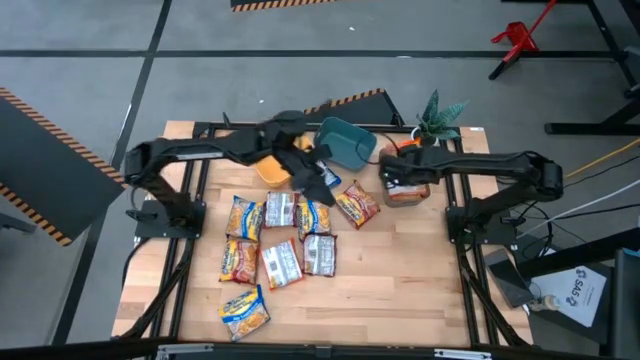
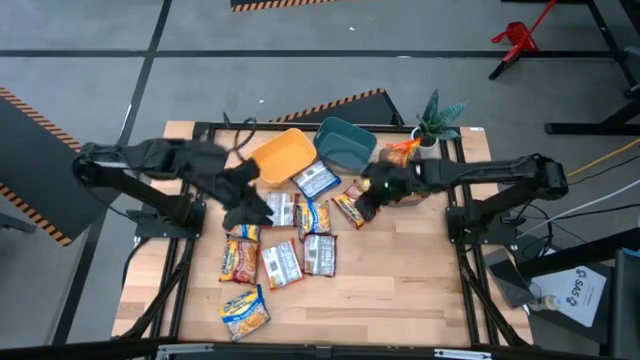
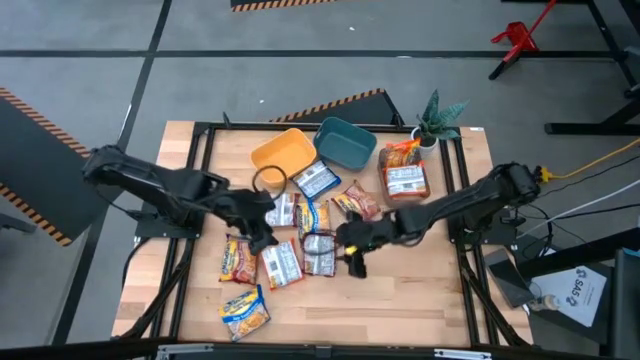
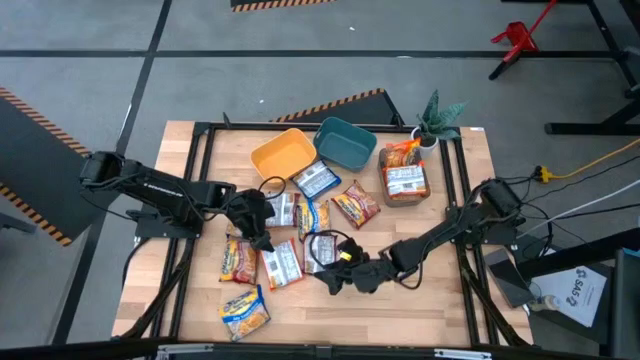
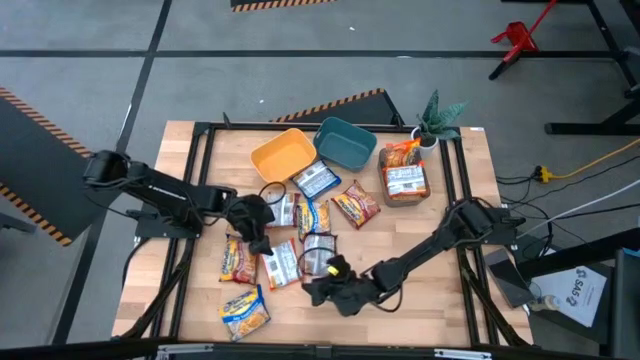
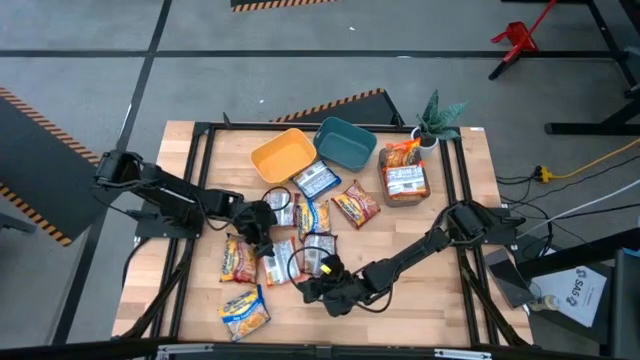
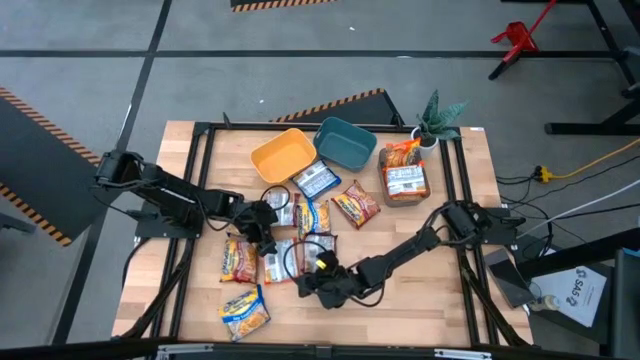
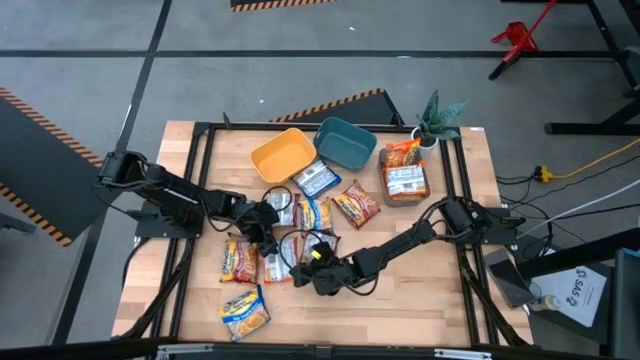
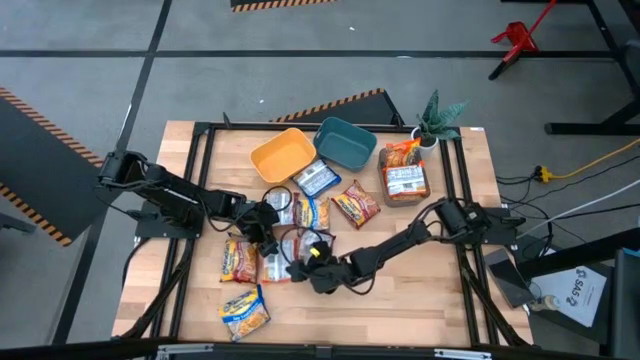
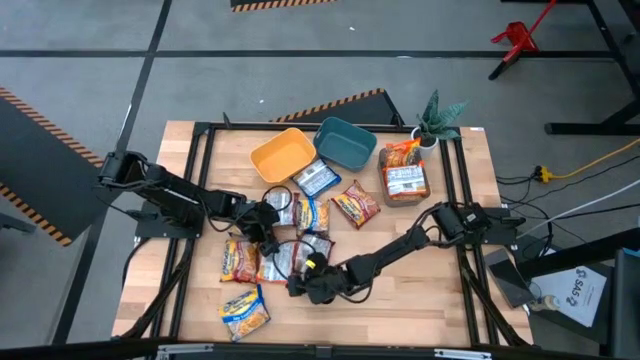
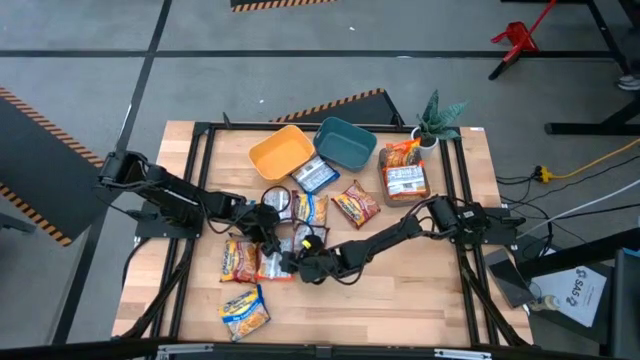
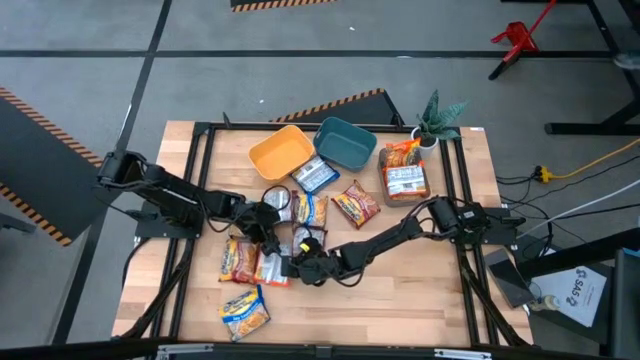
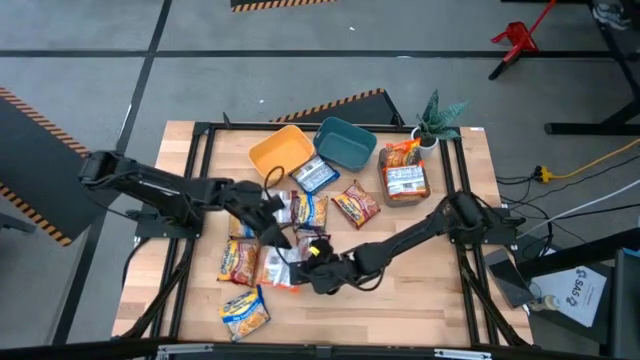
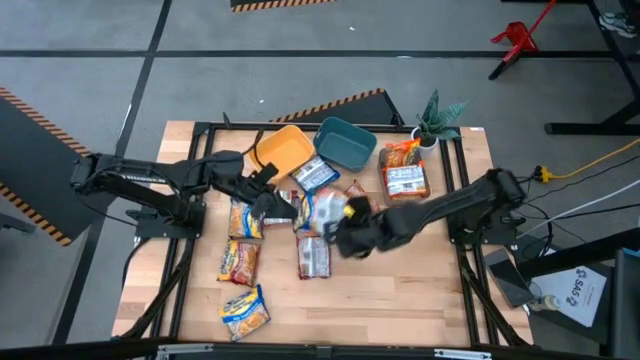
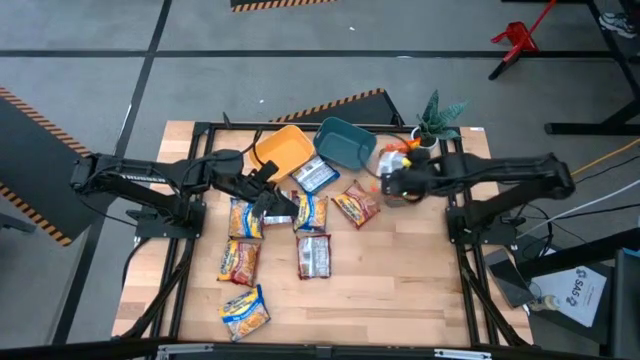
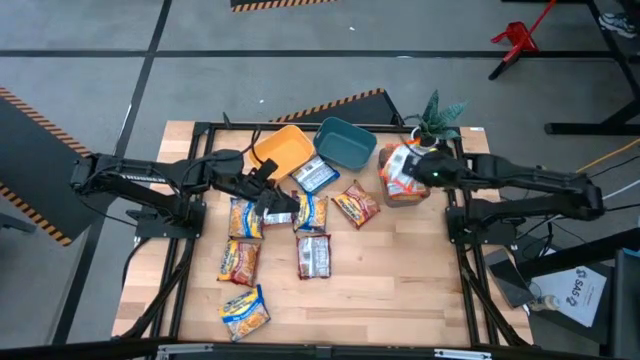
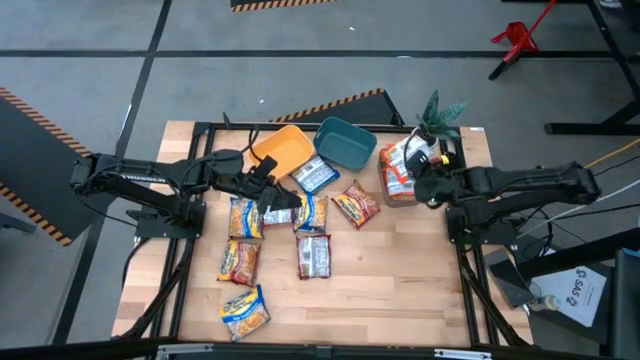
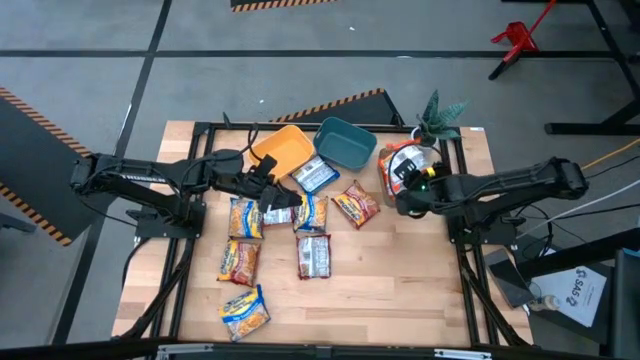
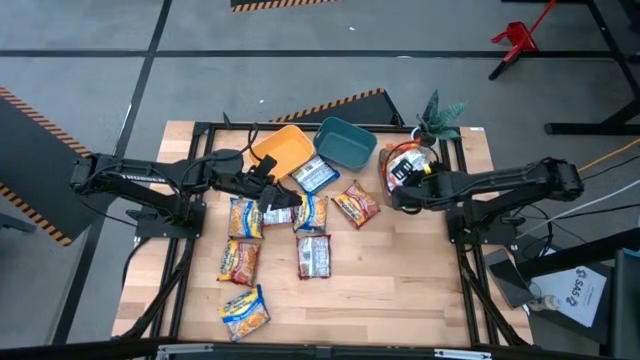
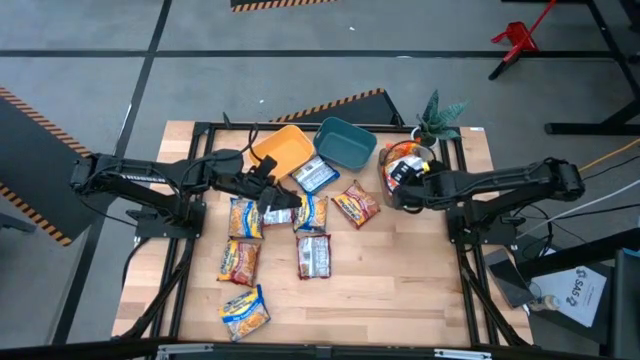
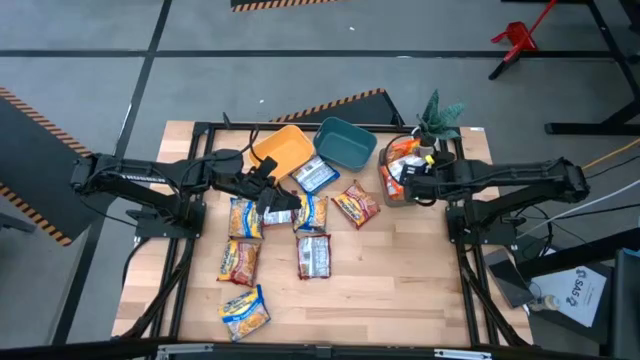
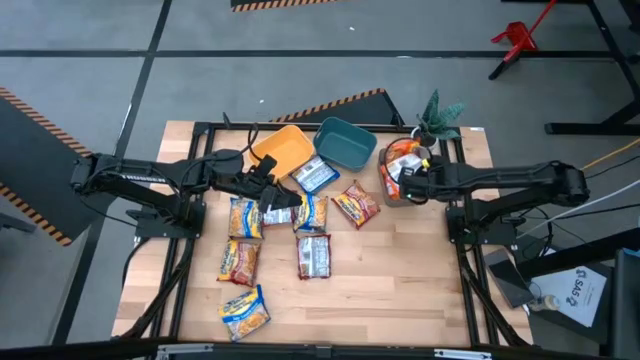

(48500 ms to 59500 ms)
Task: Sort Maruchan noodles
Put the orange noodle pack into the black bin

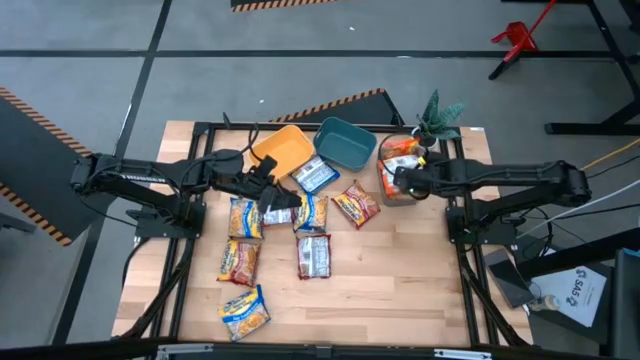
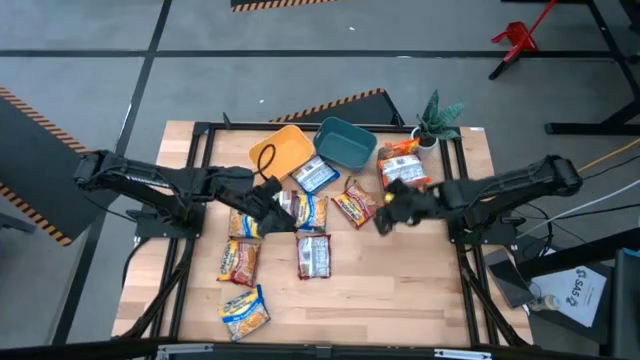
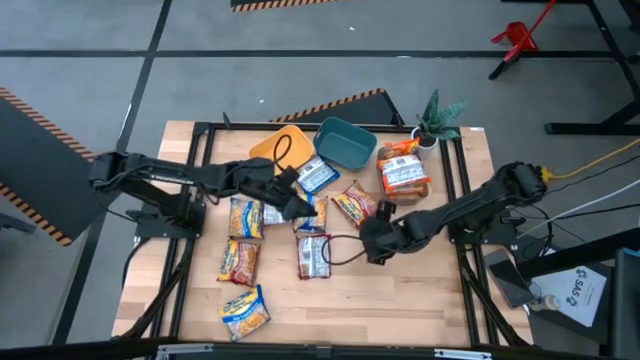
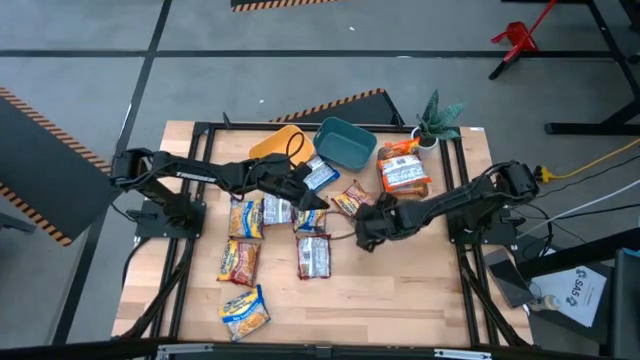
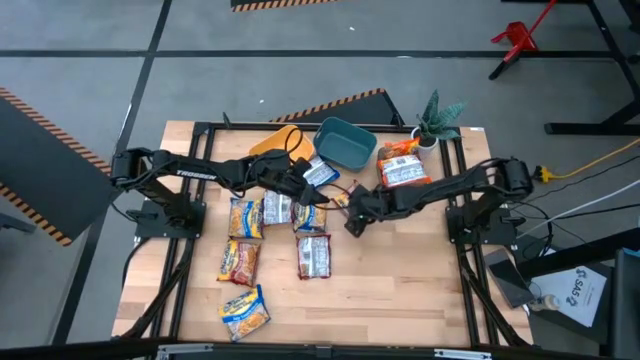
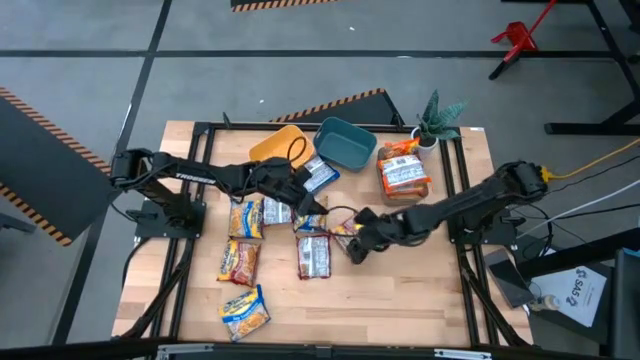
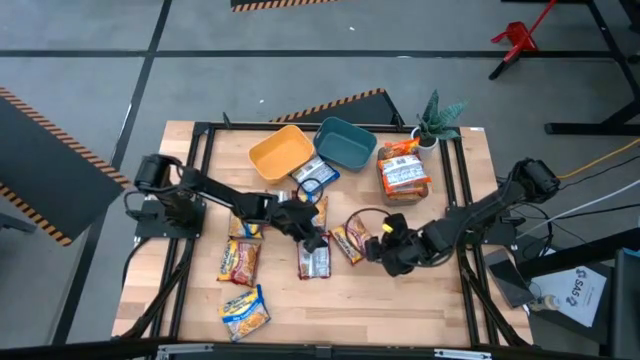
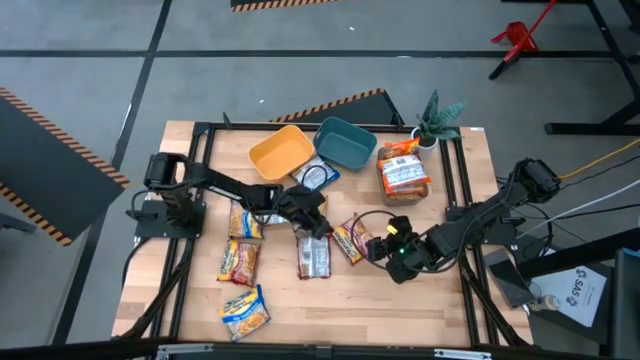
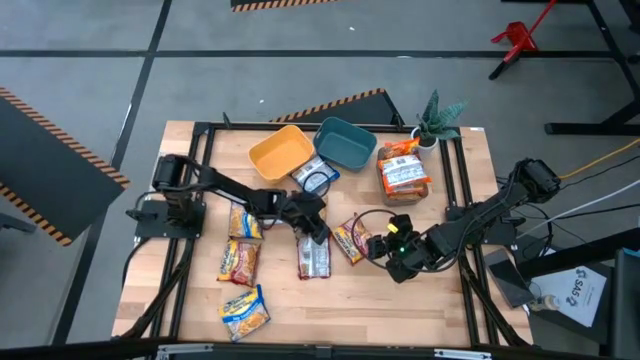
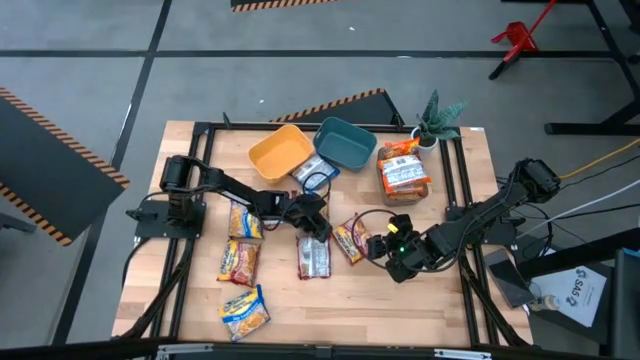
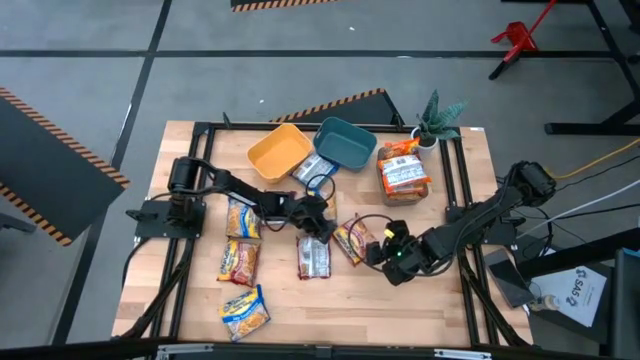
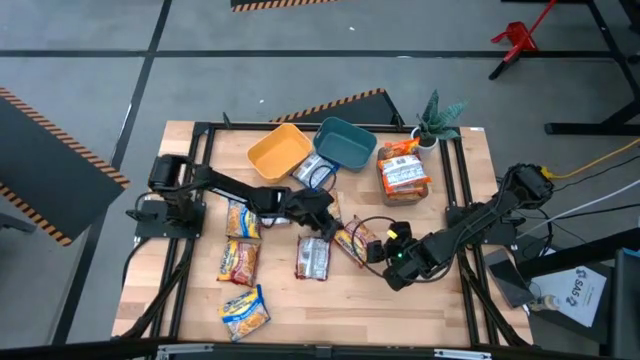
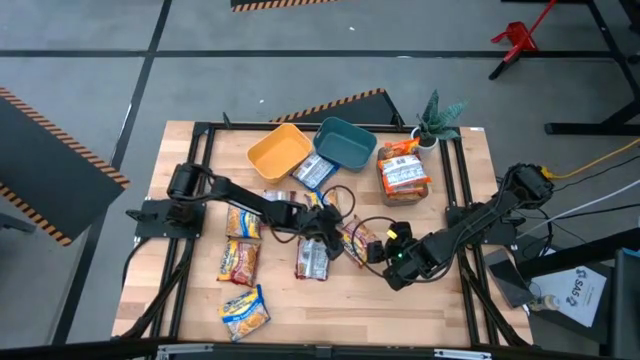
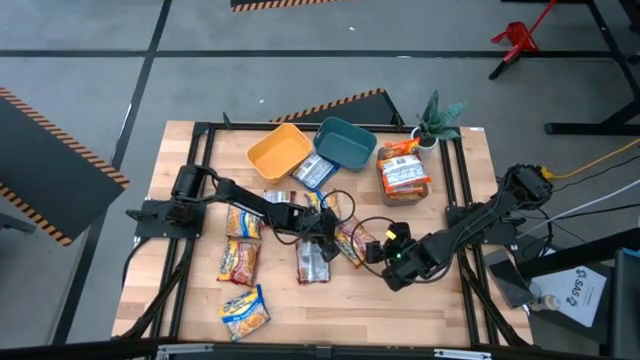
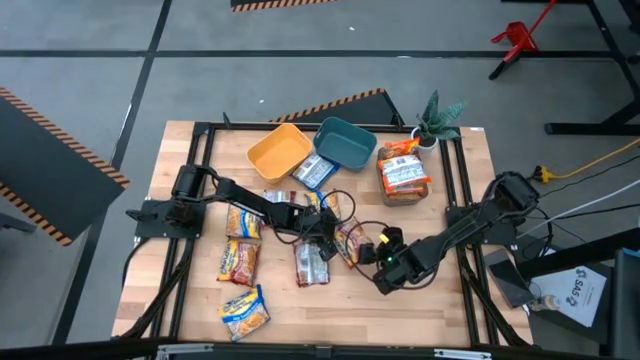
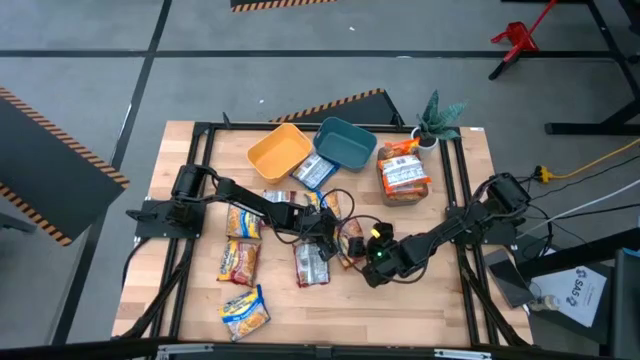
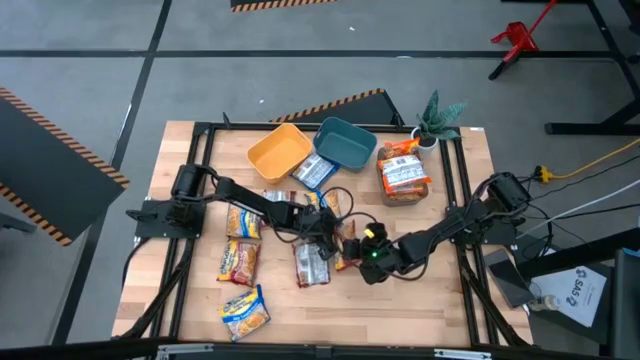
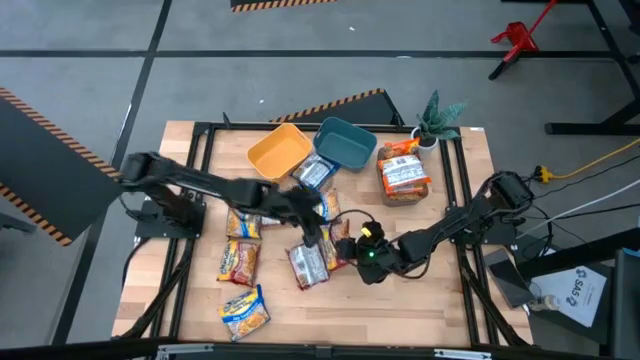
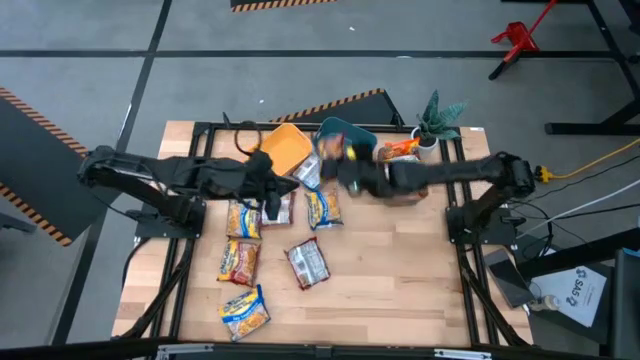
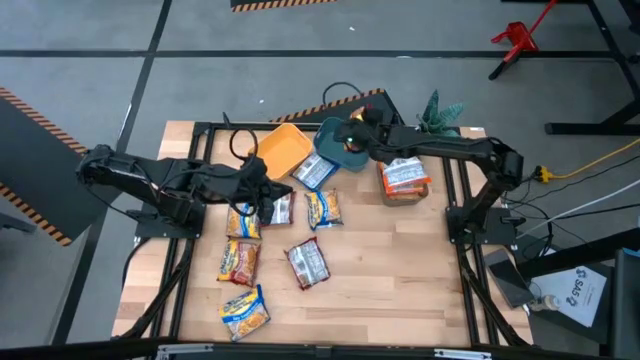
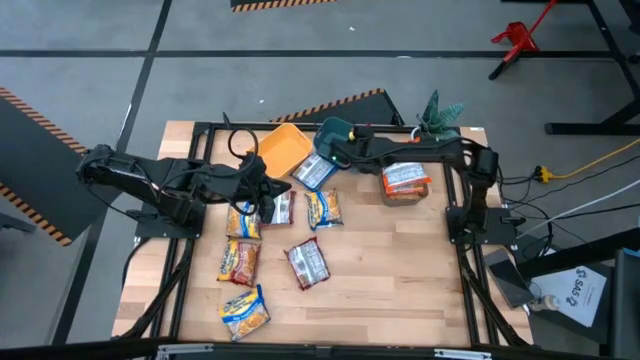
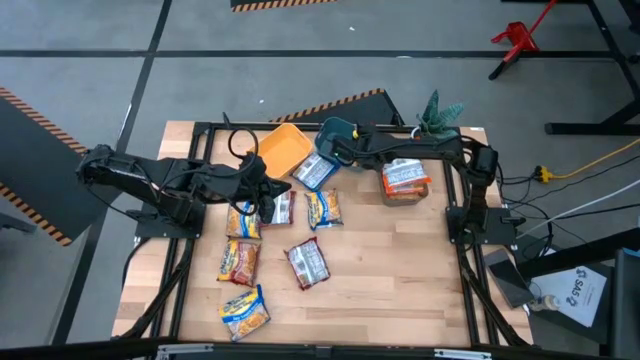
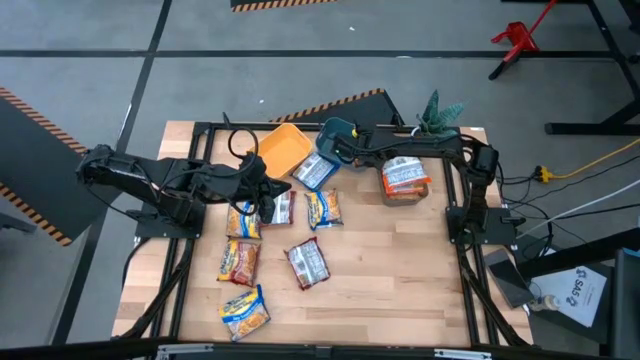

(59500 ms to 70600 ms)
Put the top right red noodle pack into the blue bin
